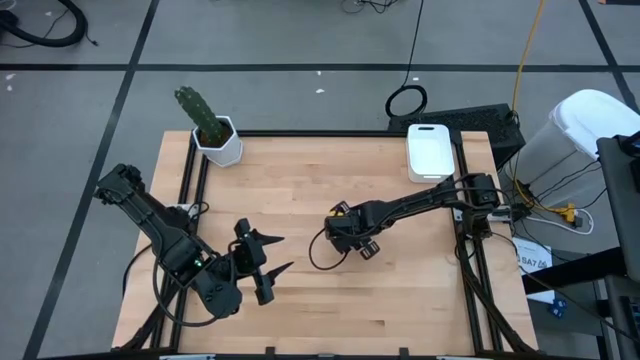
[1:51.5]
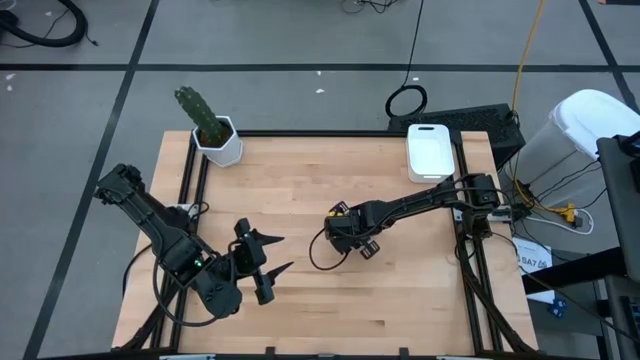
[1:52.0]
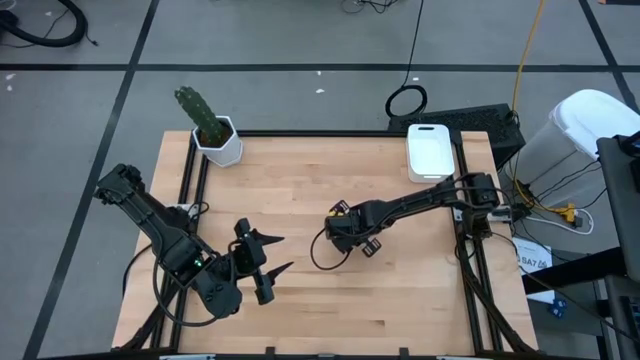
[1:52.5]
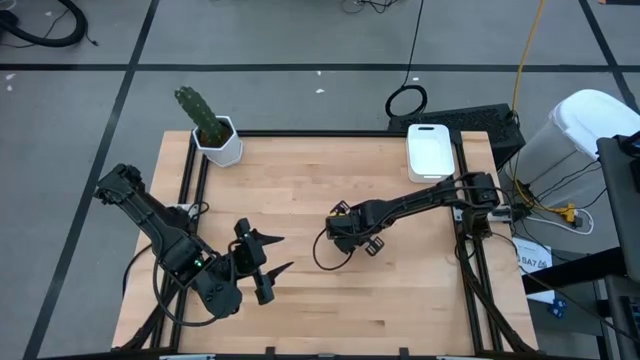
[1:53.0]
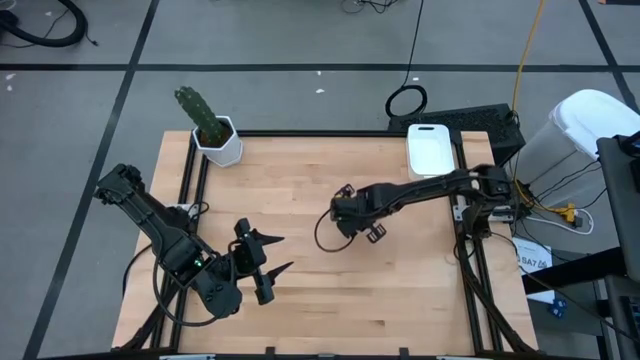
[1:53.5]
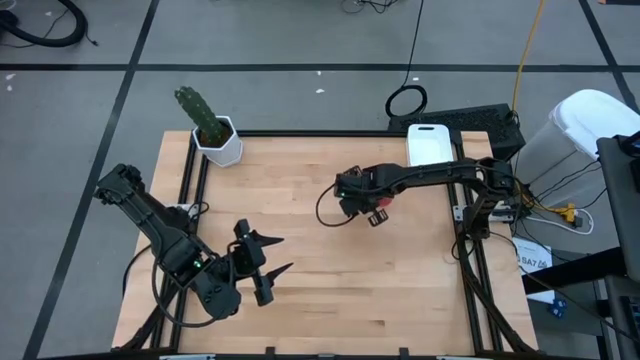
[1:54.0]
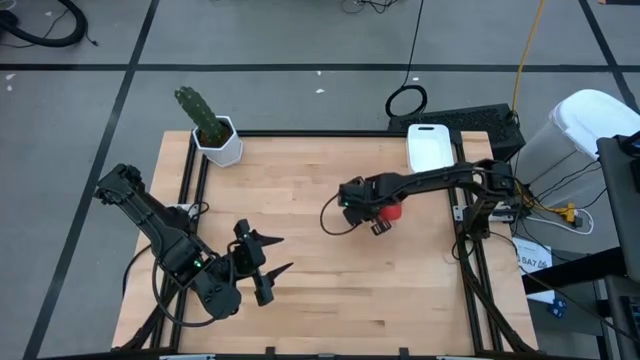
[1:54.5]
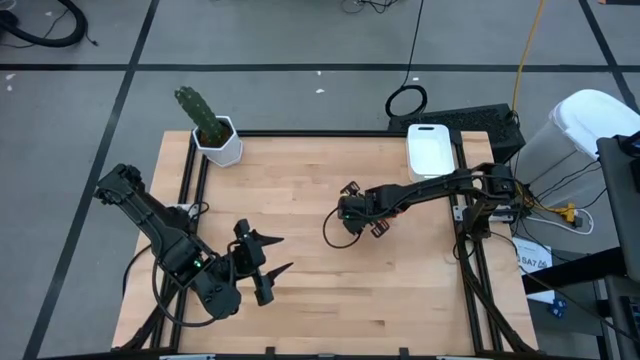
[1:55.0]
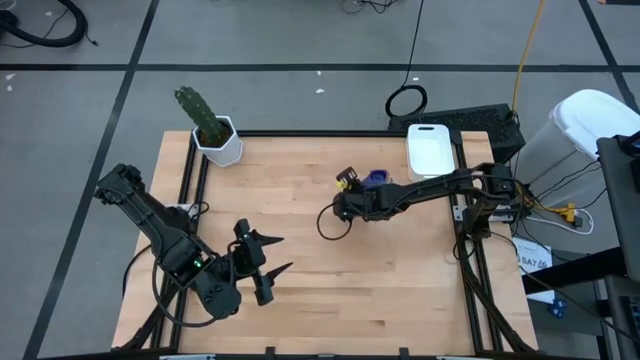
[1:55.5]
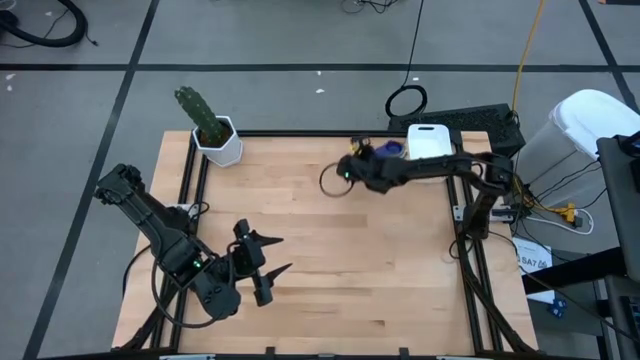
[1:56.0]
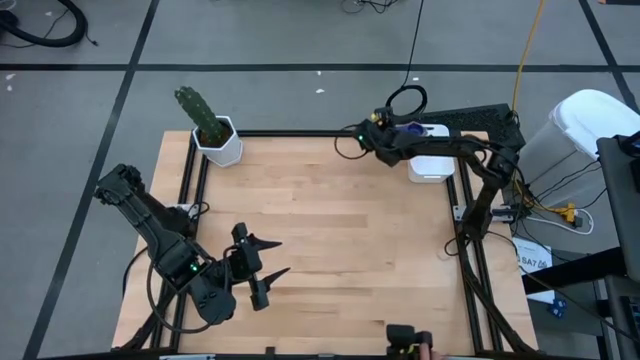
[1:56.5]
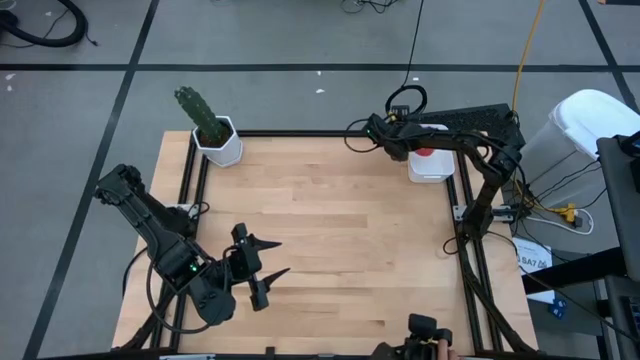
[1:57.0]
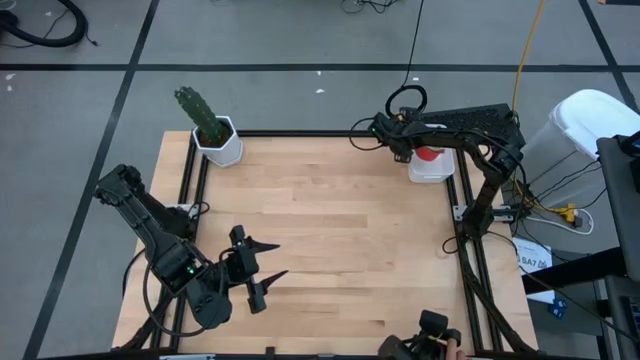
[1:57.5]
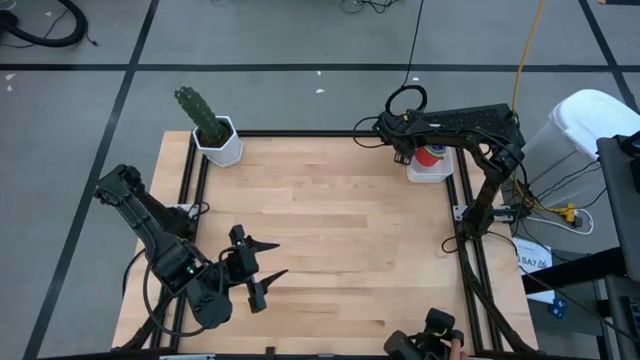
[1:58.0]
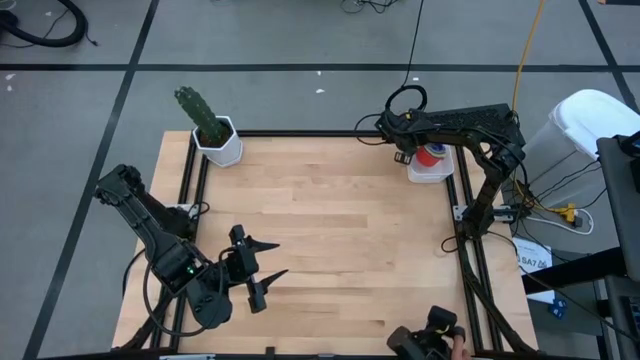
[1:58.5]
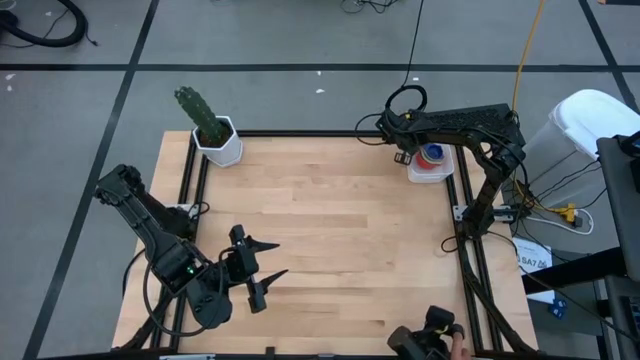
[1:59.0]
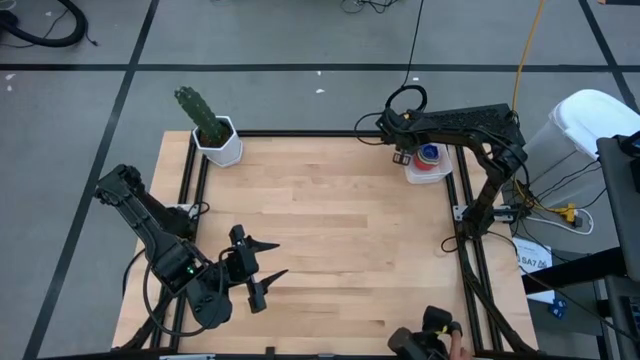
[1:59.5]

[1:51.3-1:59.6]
Task: Nest measuring cups in basket
Put the stacked measuring cups into the white bin

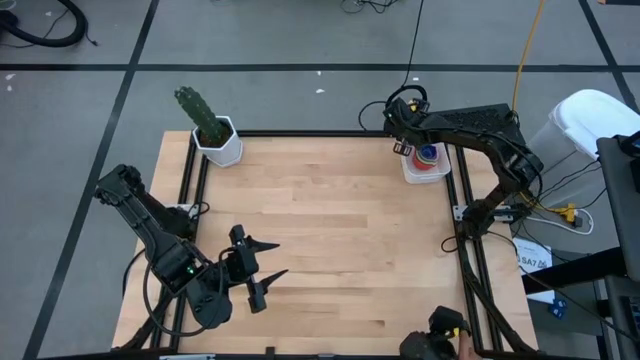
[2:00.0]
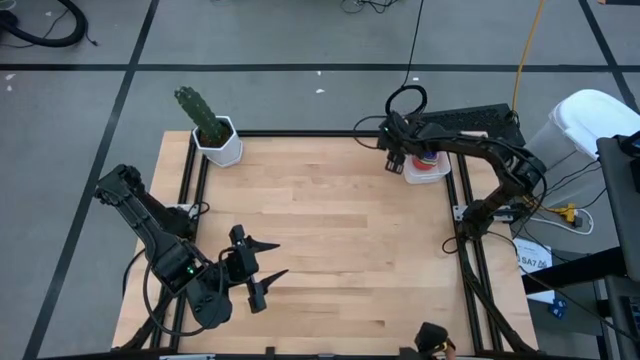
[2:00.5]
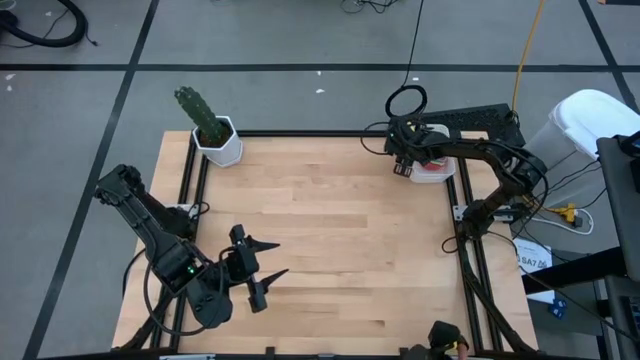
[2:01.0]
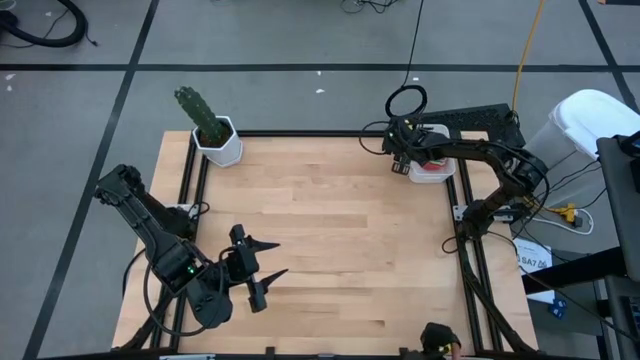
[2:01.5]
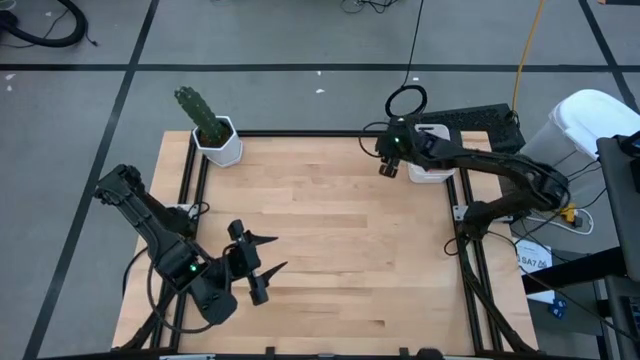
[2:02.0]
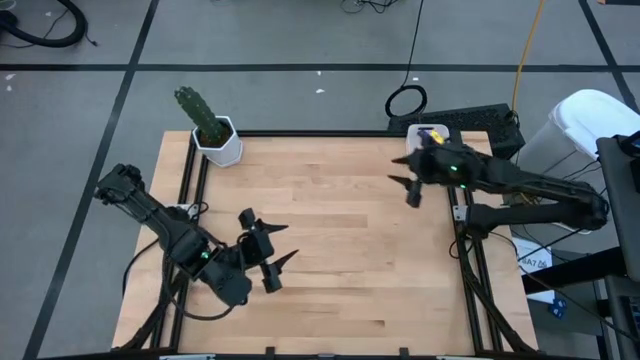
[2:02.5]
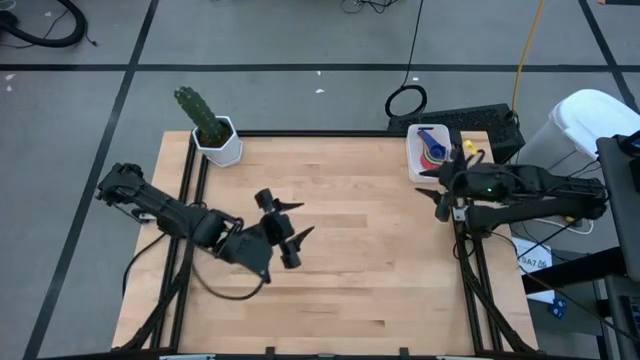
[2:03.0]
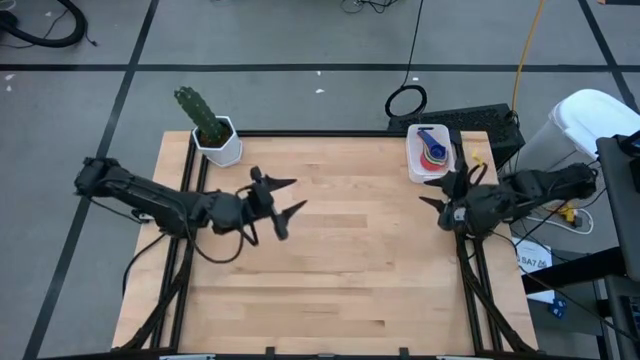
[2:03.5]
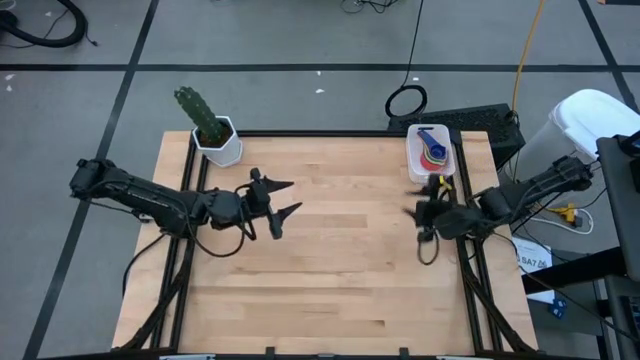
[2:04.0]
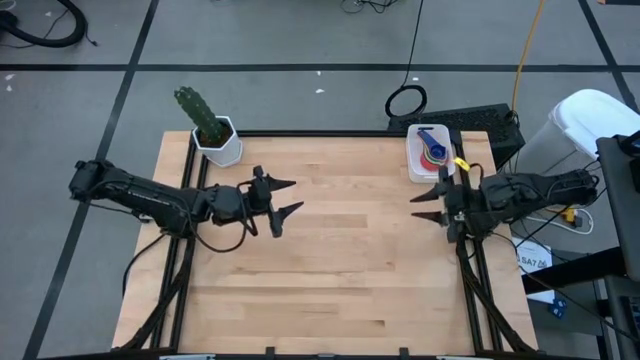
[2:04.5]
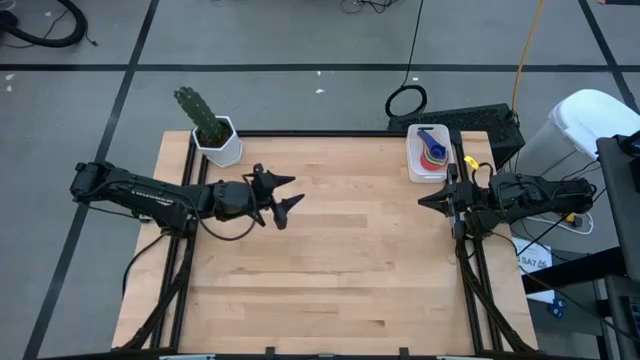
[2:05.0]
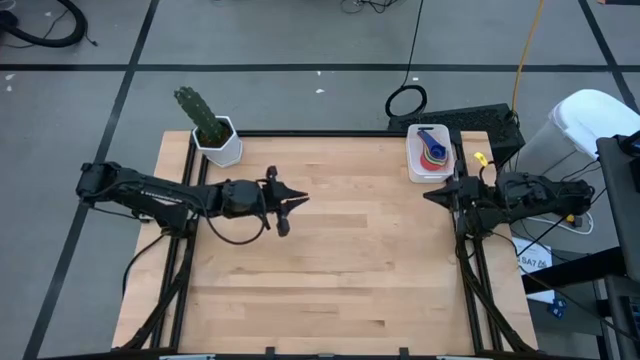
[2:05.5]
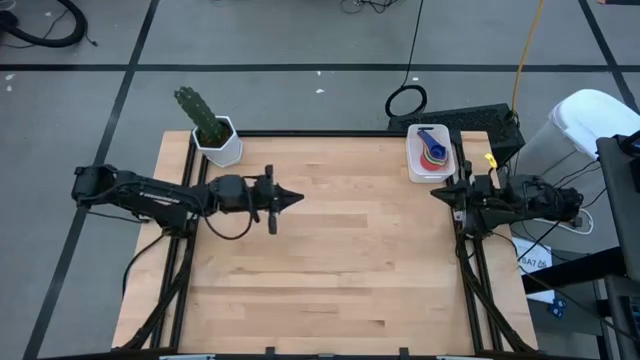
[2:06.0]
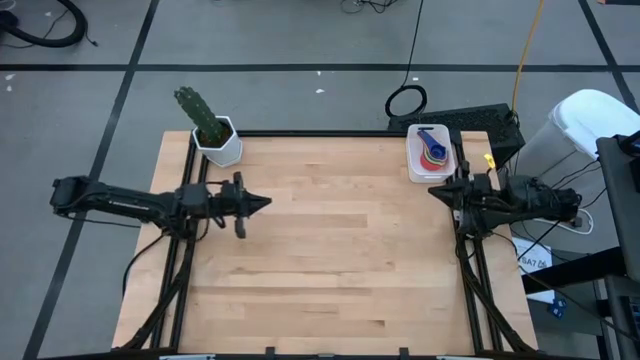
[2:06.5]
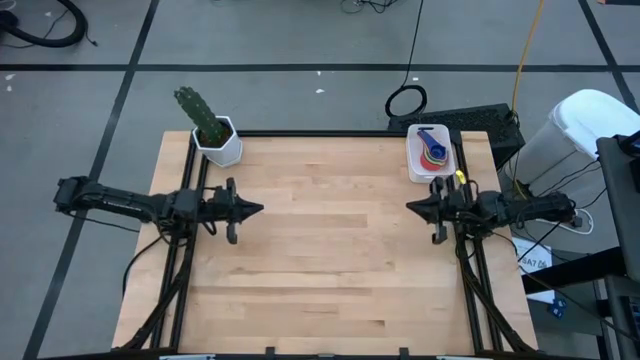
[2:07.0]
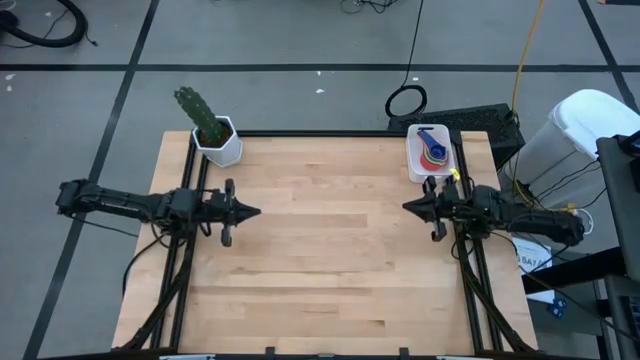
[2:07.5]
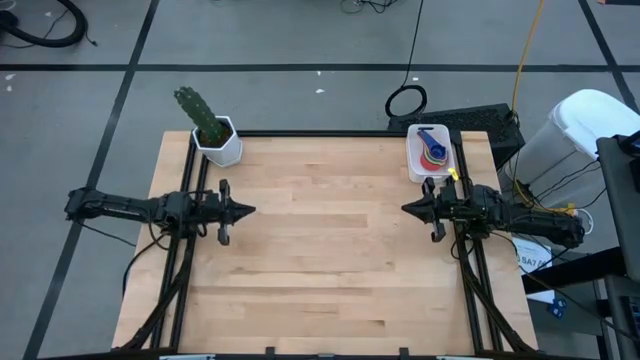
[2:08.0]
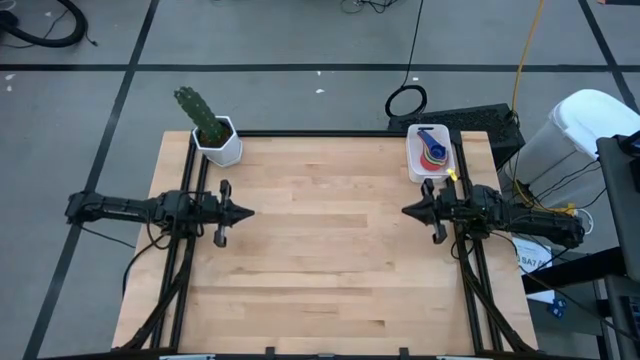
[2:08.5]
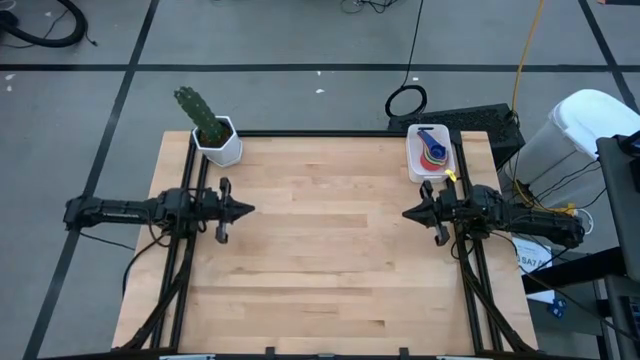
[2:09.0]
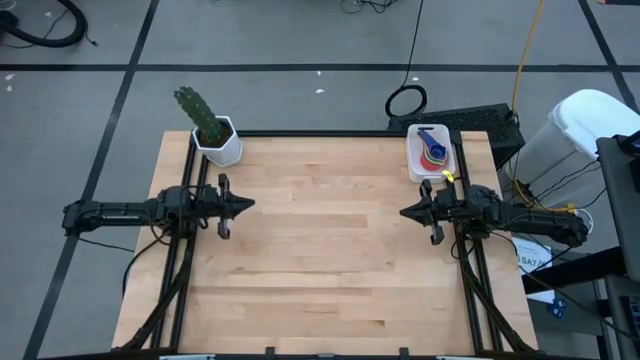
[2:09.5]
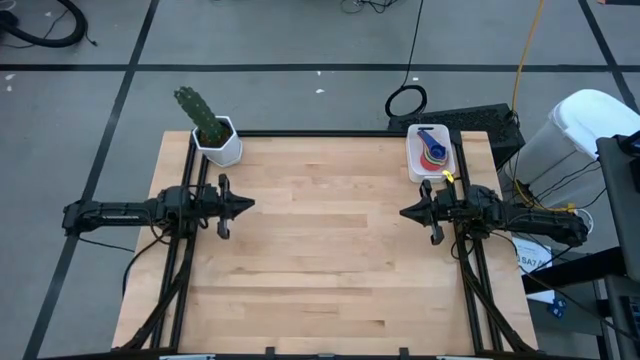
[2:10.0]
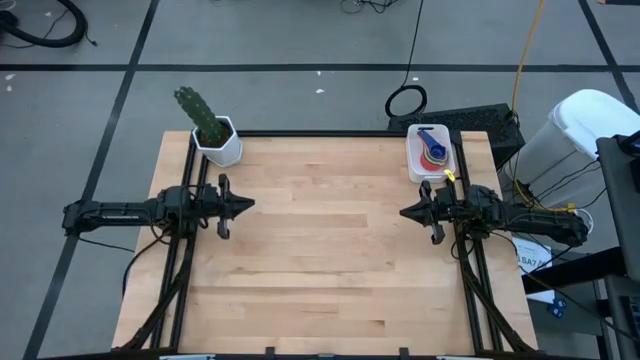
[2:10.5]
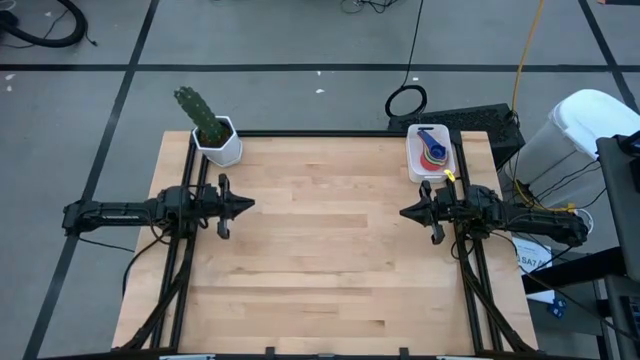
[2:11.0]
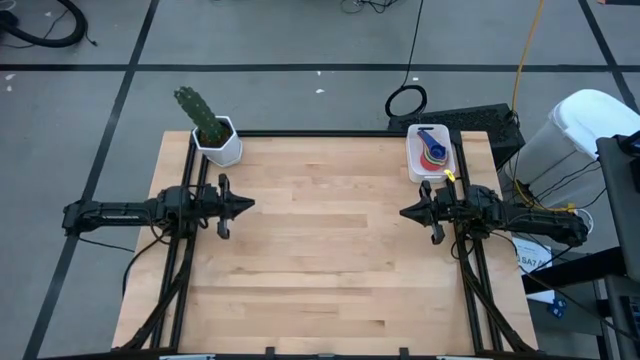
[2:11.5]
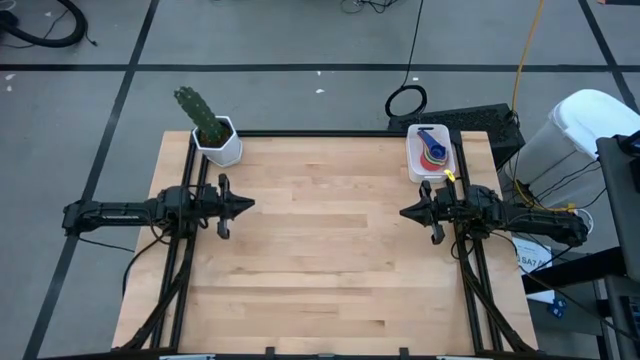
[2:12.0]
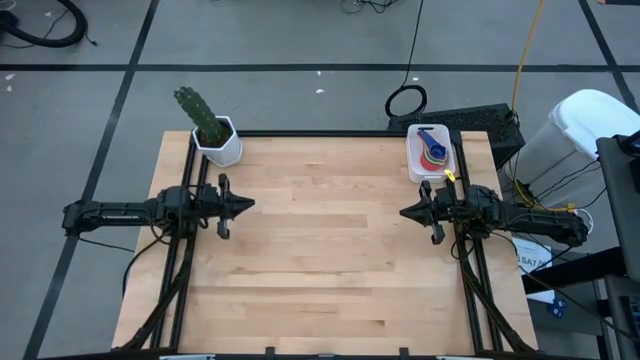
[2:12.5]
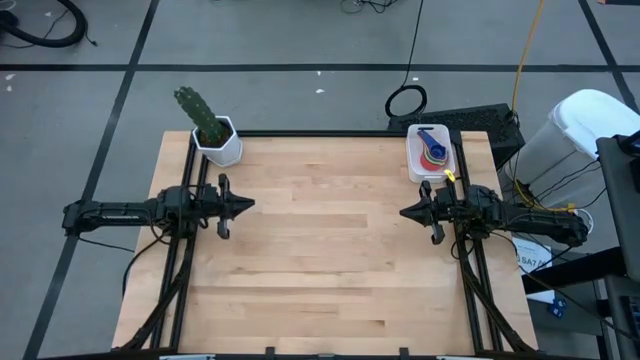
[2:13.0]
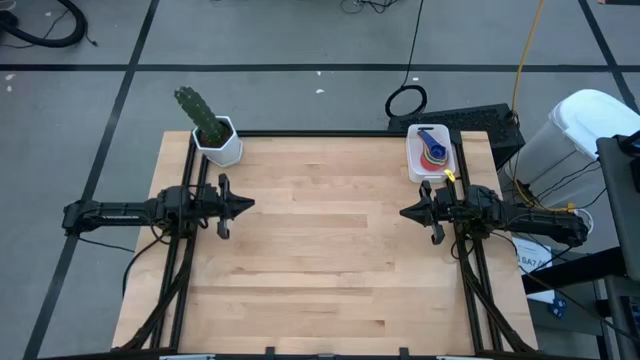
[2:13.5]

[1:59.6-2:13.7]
Return to Home Position
